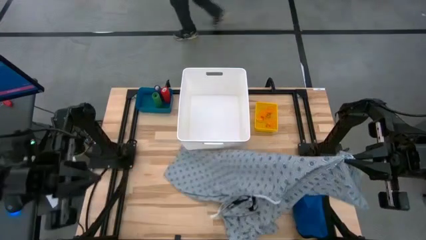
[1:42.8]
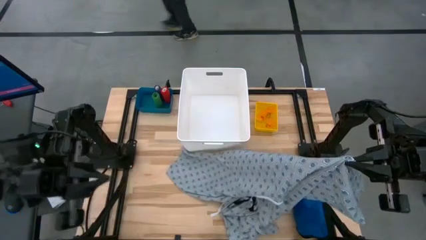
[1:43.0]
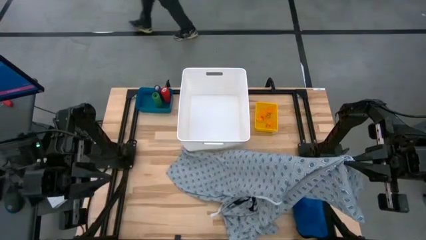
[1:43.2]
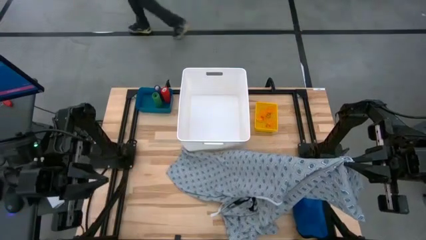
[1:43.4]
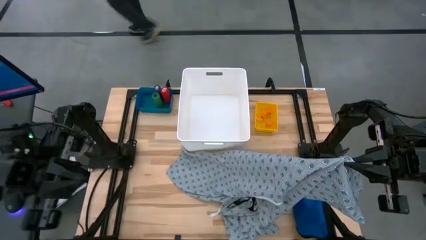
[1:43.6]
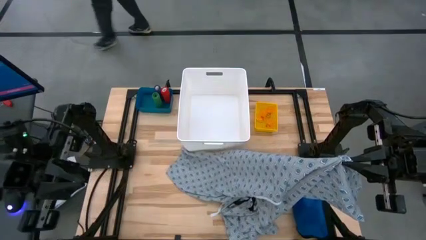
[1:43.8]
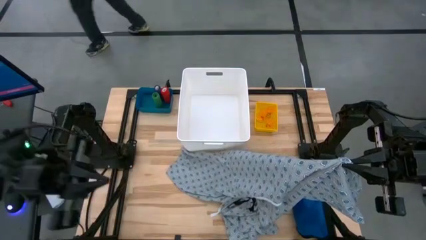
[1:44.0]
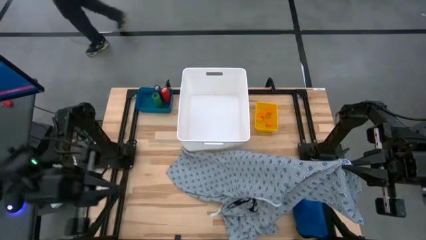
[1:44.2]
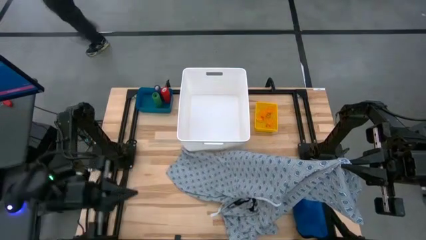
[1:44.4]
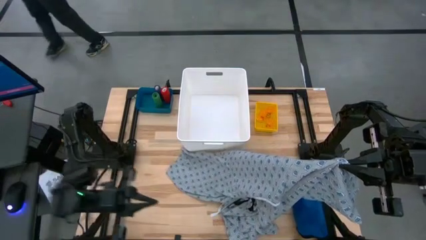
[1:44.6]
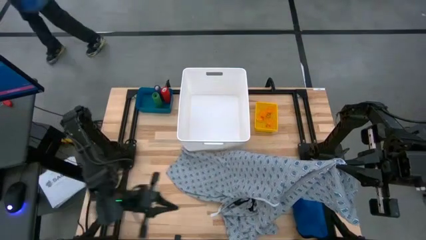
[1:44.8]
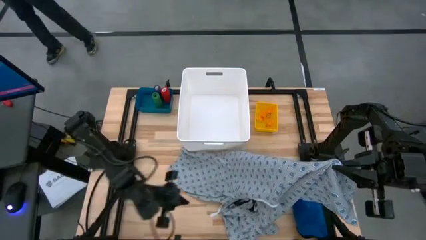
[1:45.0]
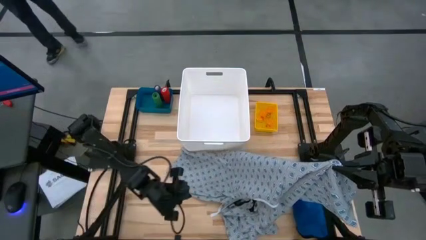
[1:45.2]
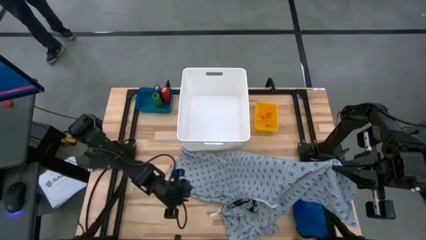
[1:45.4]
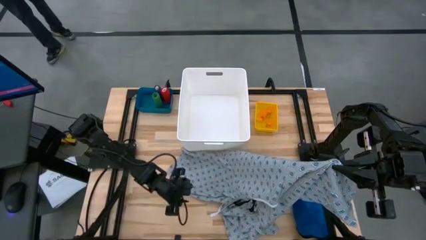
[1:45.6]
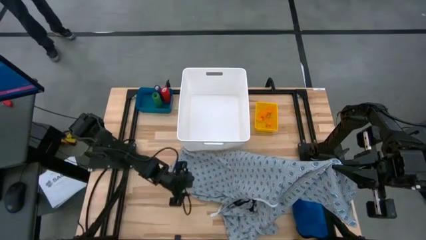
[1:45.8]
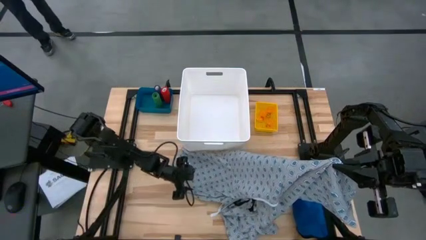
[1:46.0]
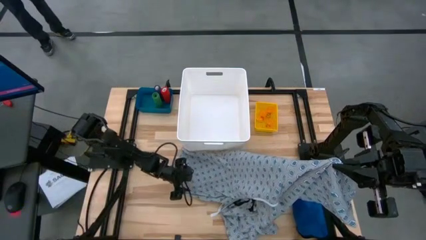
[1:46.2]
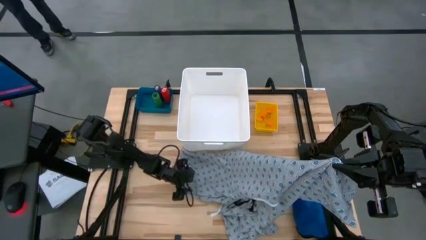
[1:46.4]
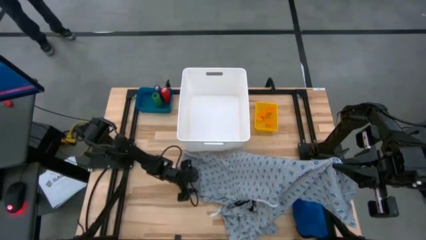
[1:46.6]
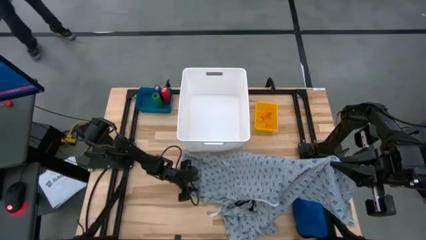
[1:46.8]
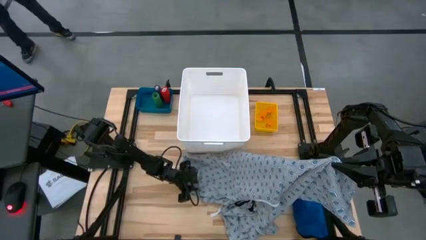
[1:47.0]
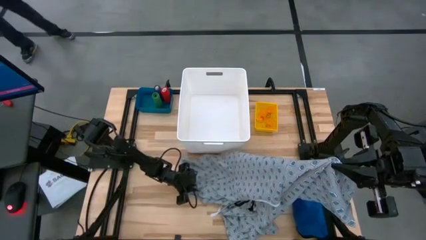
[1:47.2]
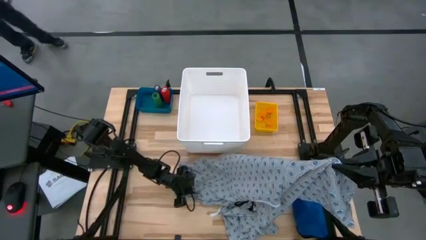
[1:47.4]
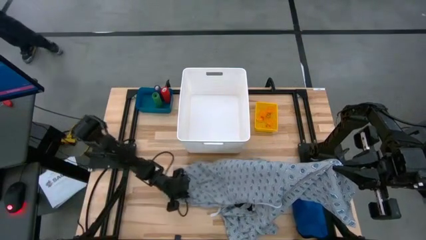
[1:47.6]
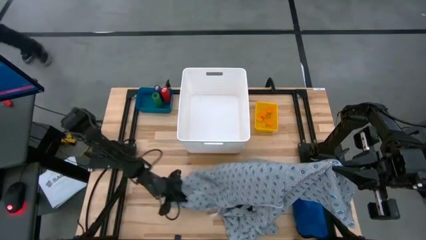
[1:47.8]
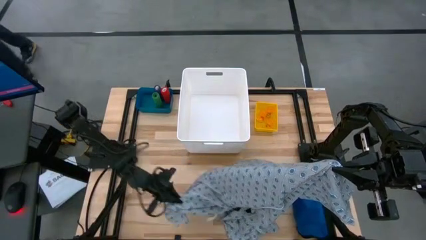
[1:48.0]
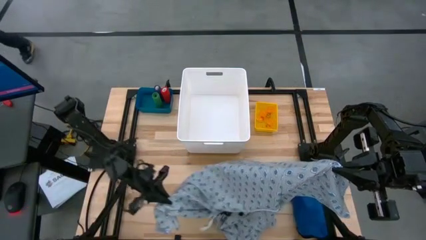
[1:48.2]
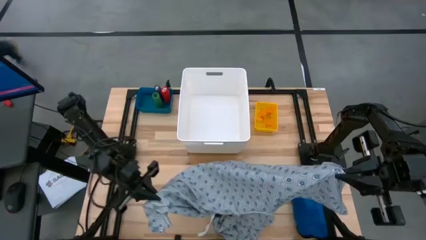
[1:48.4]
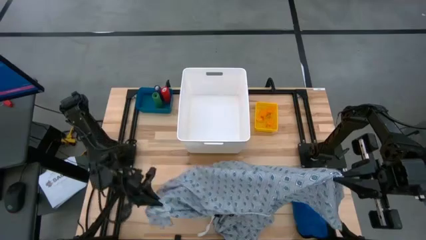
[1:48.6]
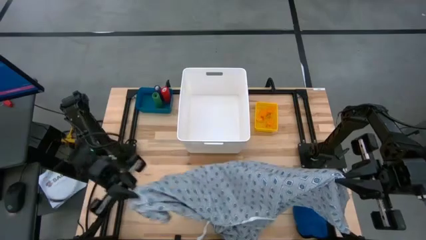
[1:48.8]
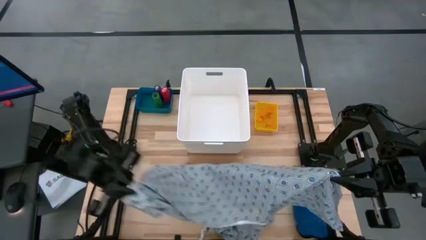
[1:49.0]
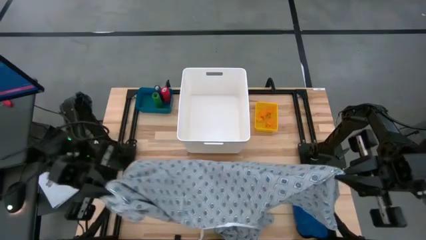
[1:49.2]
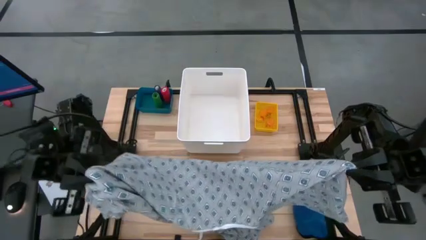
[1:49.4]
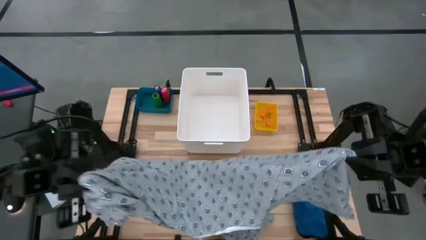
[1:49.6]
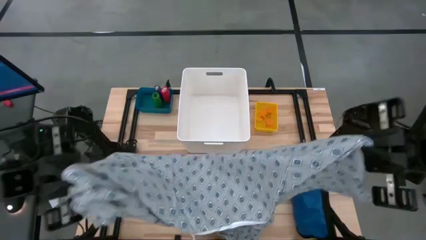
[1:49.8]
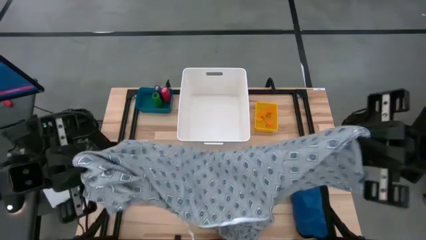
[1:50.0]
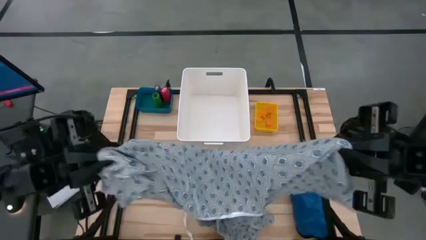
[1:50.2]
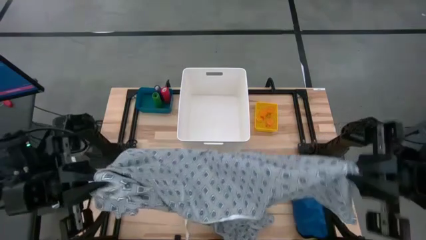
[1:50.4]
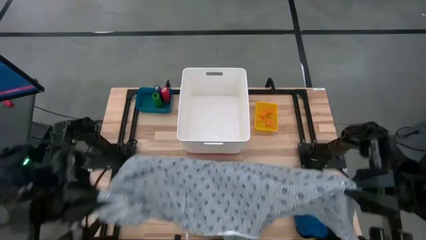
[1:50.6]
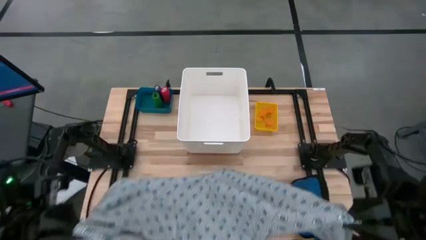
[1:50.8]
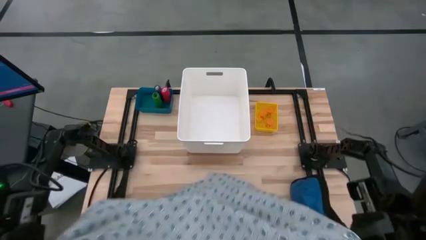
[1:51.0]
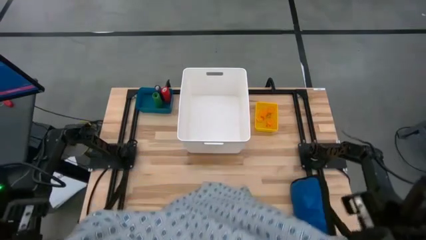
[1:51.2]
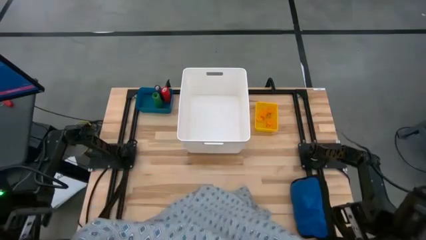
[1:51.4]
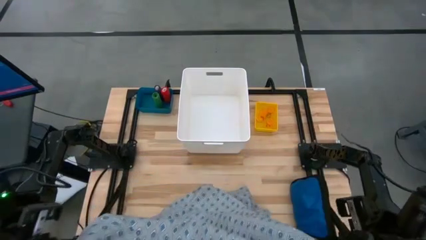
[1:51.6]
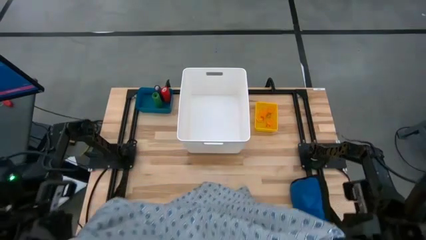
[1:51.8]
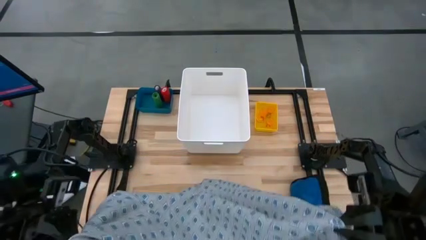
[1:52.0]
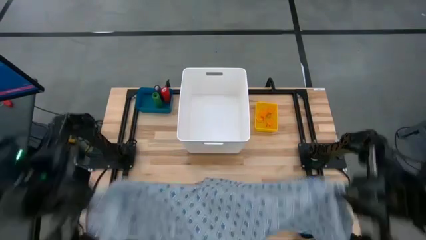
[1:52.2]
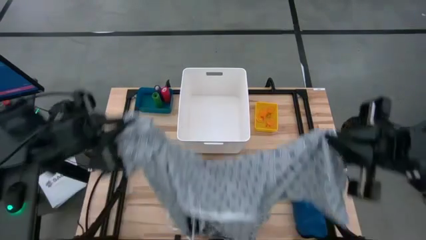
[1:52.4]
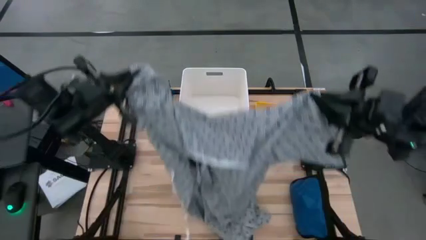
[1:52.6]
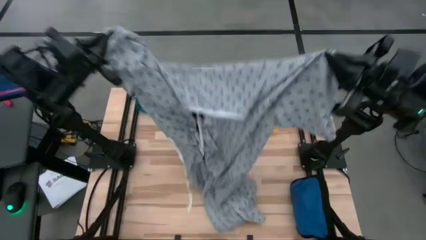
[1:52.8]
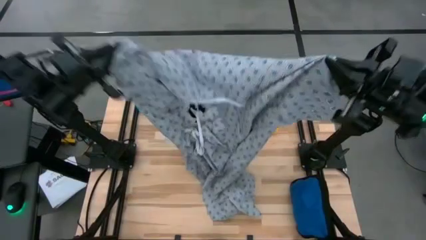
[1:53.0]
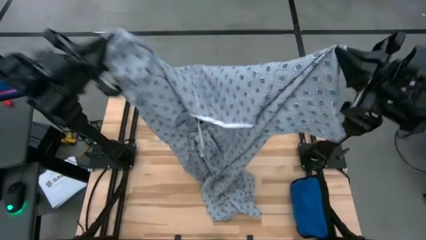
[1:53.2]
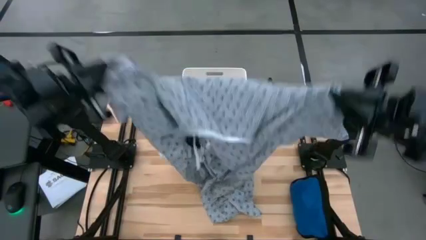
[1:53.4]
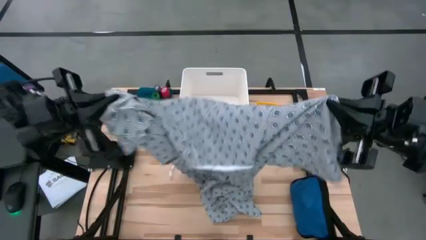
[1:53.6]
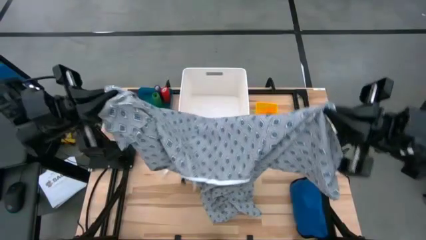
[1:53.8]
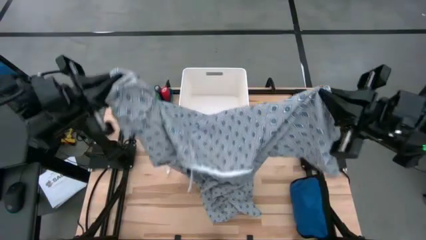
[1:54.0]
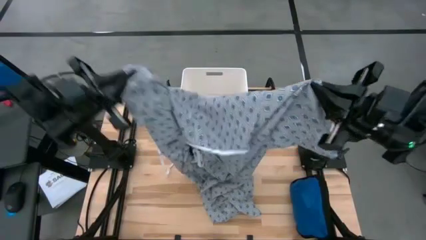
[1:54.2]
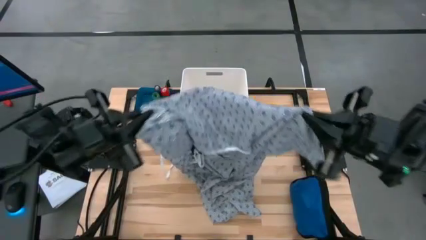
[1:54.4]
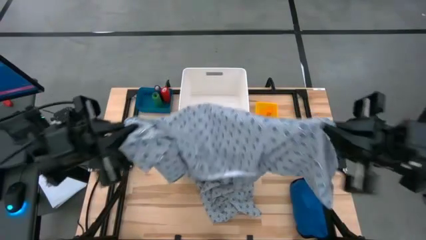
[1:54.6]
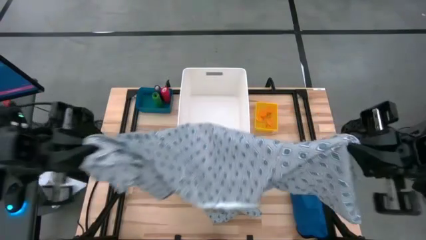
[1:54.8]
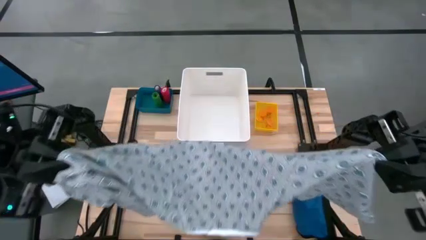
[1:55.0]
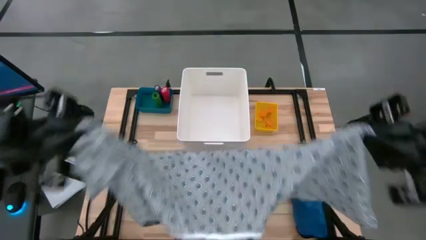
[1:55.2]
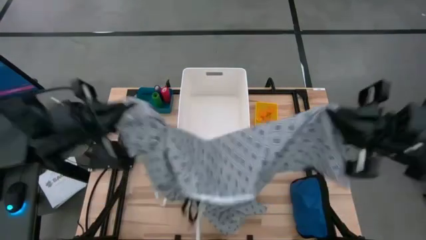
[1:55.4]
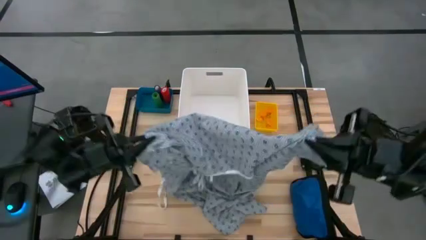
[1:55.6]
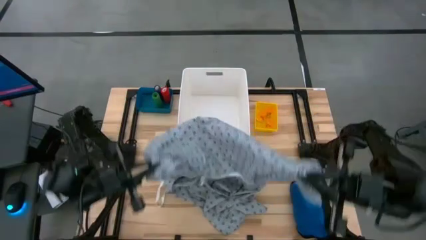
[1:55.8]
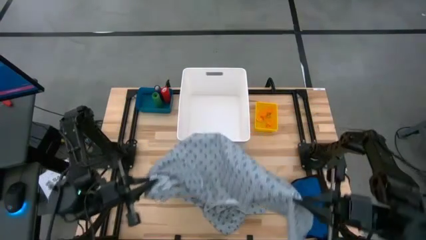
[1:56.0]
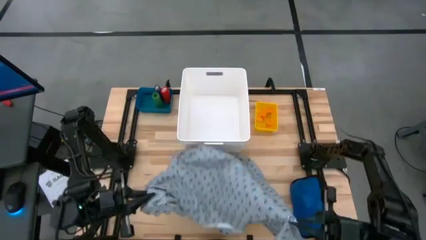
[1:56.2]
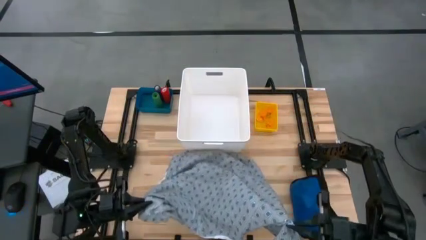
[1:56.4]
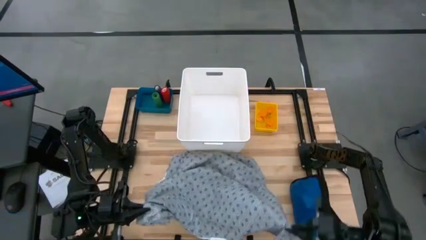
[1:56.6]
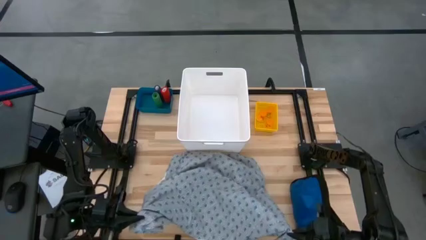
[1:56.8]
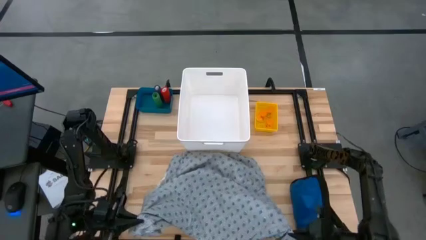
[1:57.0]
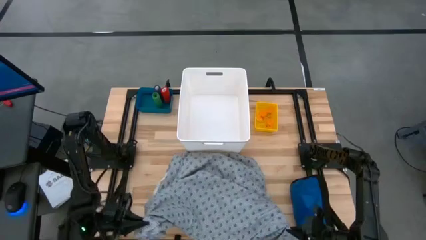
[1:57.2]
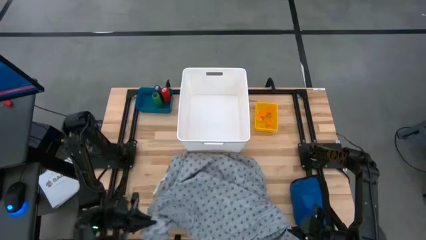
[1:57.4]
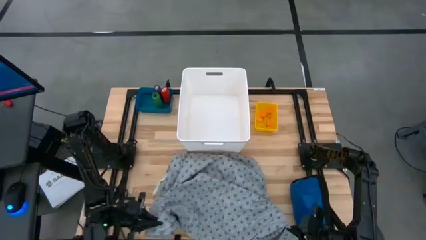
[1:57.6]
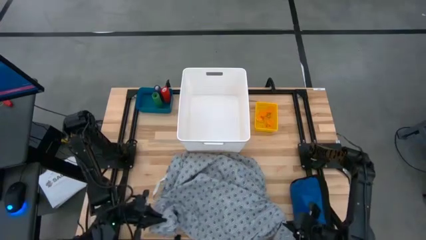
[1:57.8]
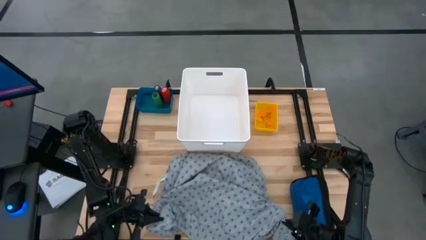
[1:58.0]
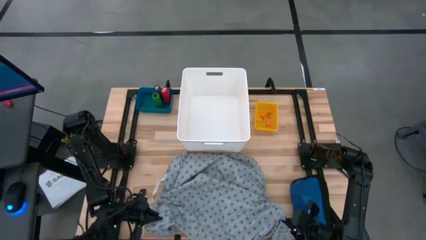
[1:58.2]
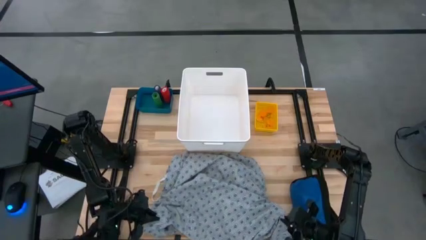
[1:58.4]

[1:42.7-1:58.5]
Task: Pick & place medical supplies in basket/bin
Put the gray patient gown into the white bin
